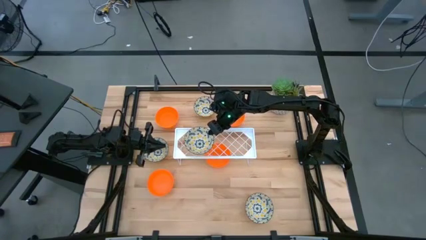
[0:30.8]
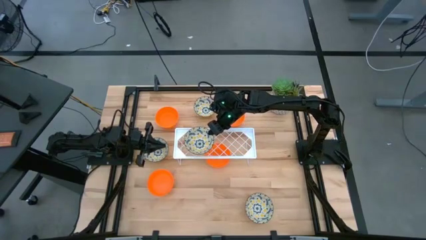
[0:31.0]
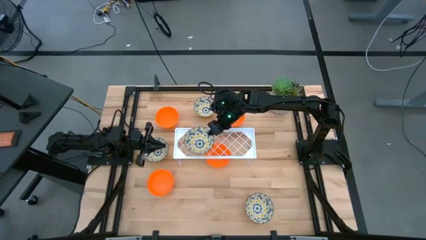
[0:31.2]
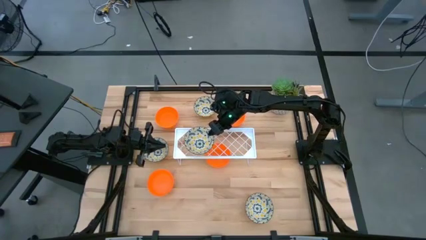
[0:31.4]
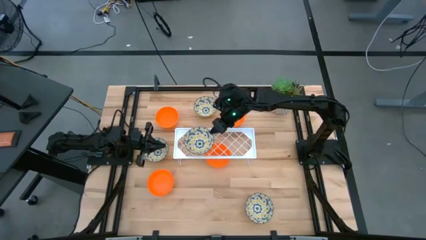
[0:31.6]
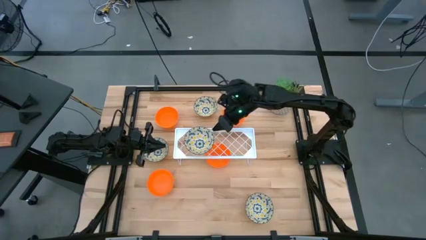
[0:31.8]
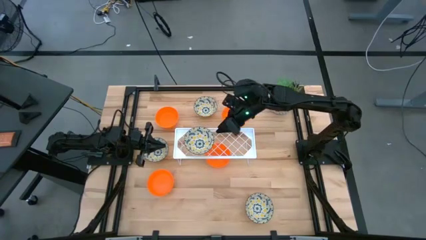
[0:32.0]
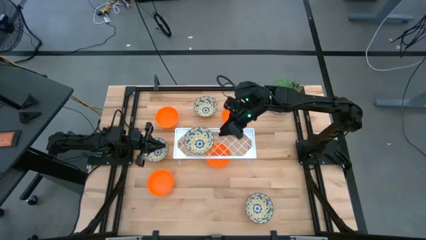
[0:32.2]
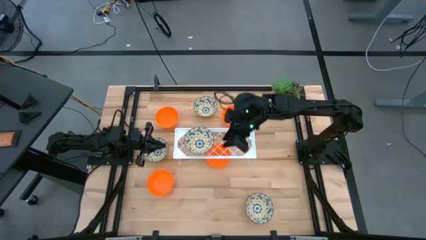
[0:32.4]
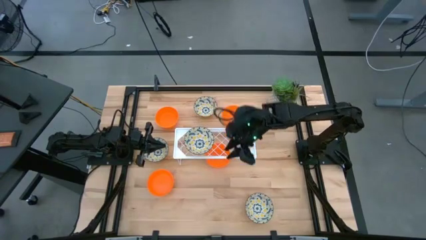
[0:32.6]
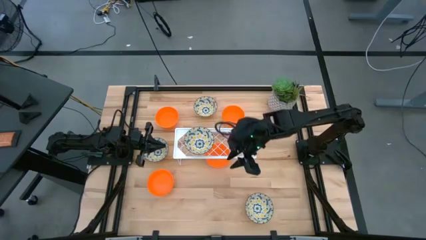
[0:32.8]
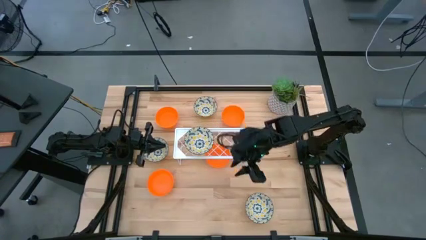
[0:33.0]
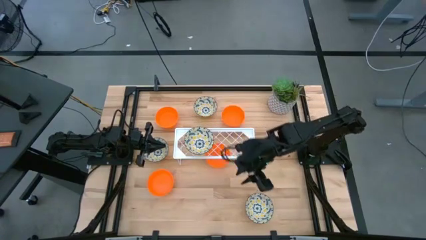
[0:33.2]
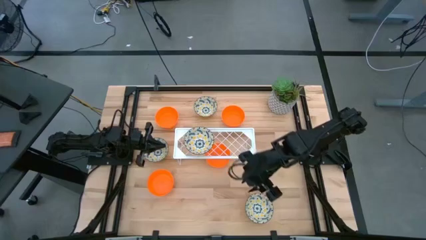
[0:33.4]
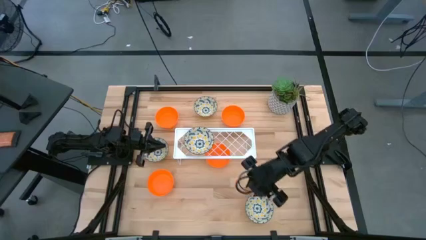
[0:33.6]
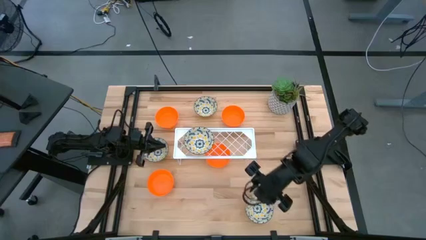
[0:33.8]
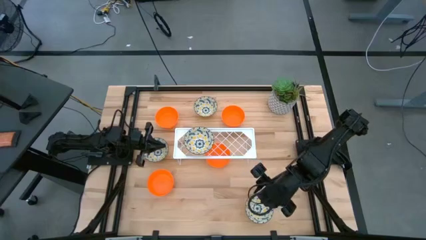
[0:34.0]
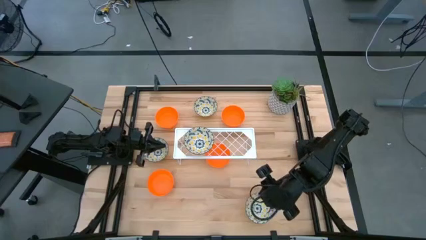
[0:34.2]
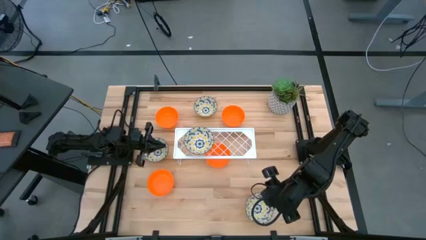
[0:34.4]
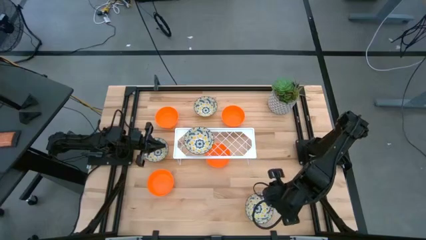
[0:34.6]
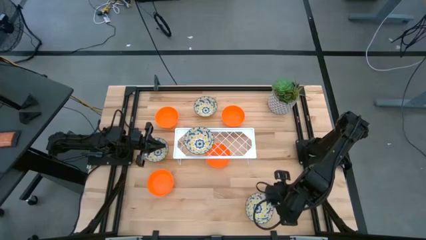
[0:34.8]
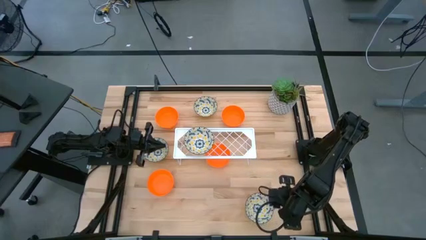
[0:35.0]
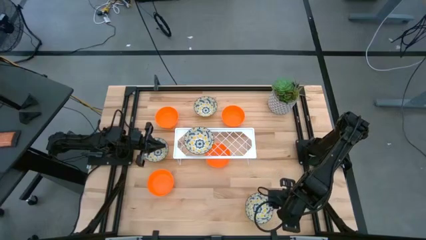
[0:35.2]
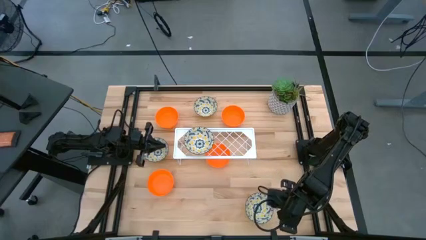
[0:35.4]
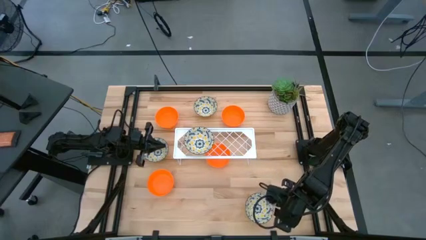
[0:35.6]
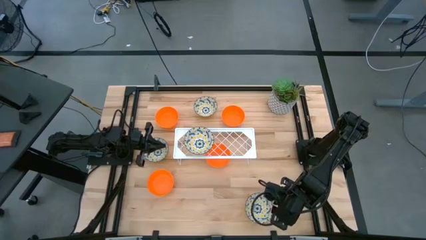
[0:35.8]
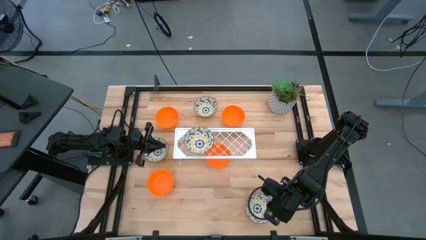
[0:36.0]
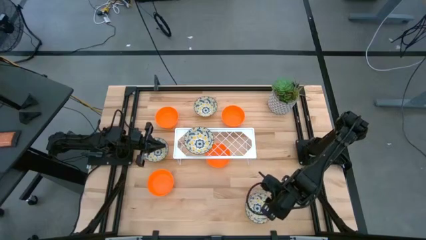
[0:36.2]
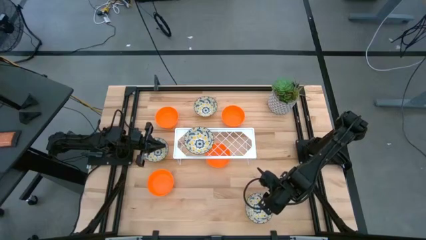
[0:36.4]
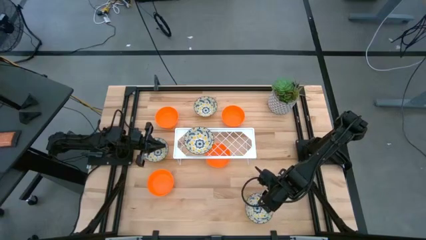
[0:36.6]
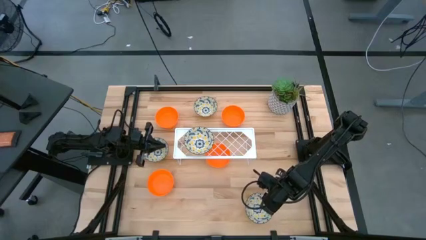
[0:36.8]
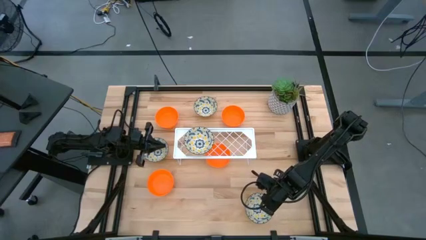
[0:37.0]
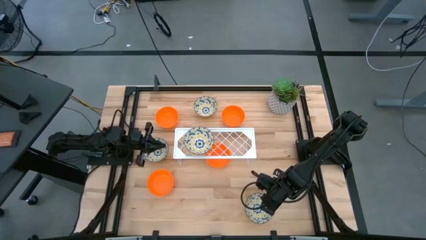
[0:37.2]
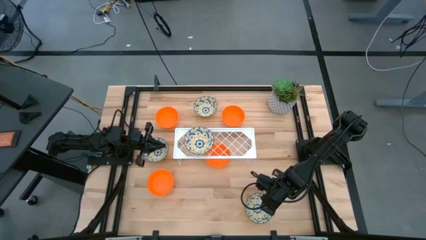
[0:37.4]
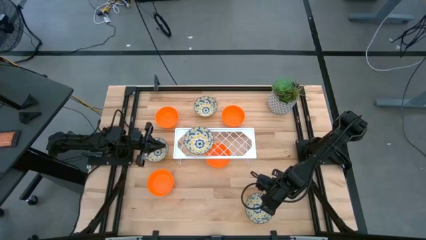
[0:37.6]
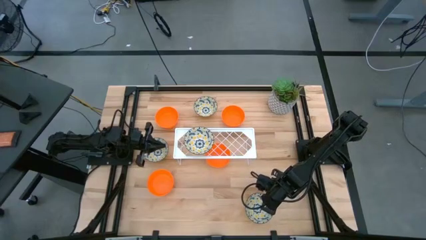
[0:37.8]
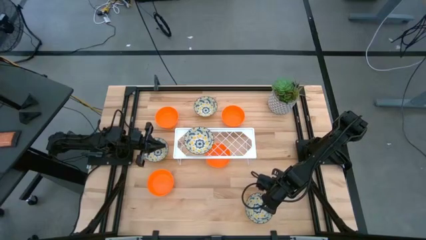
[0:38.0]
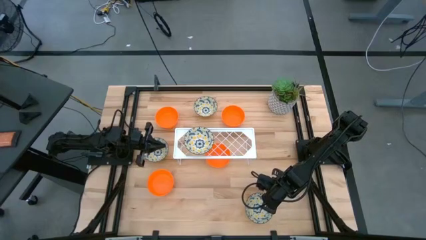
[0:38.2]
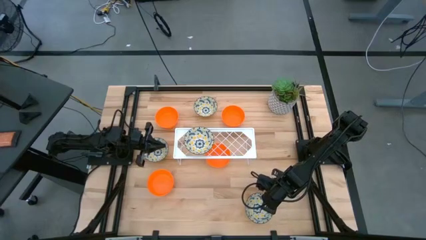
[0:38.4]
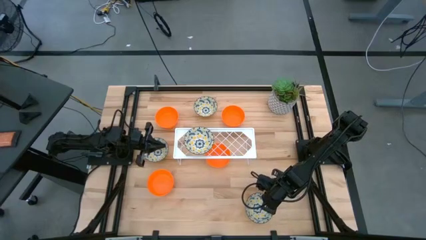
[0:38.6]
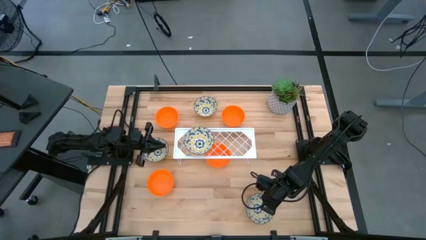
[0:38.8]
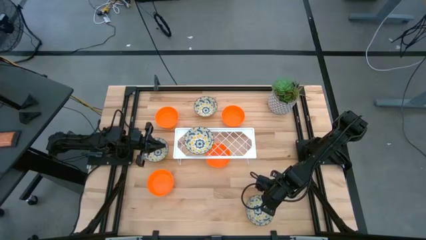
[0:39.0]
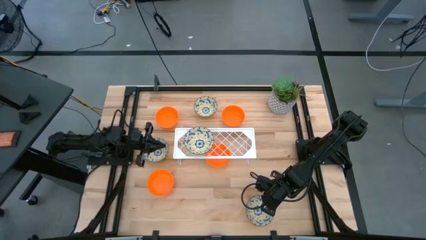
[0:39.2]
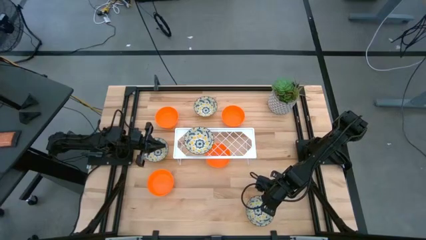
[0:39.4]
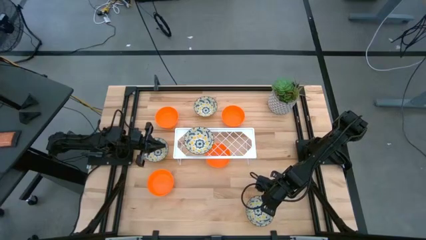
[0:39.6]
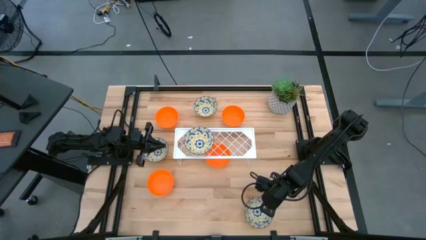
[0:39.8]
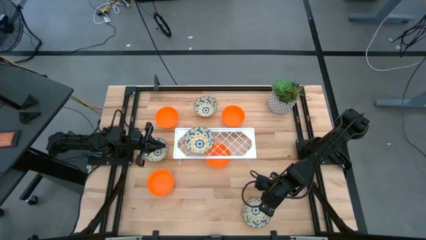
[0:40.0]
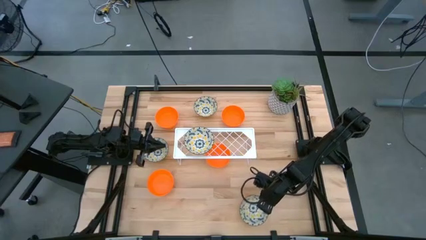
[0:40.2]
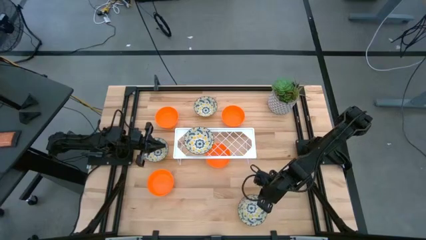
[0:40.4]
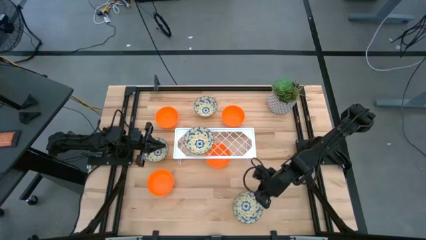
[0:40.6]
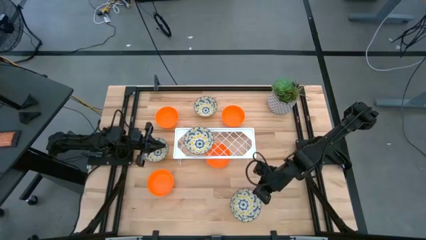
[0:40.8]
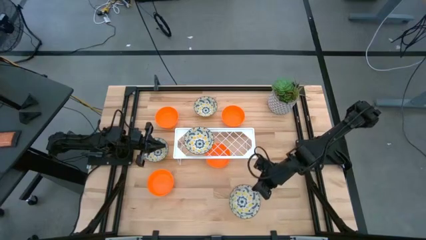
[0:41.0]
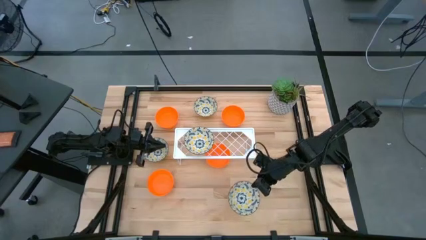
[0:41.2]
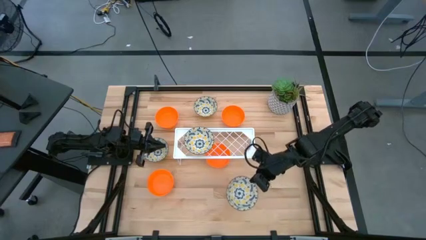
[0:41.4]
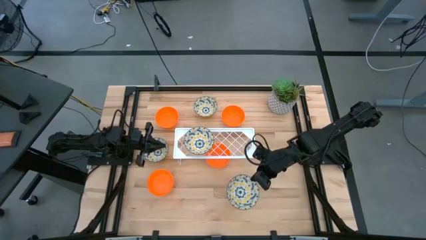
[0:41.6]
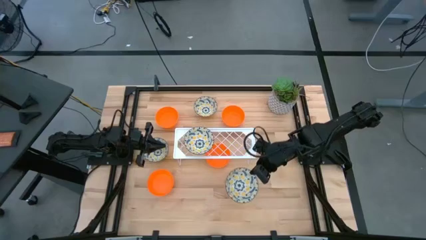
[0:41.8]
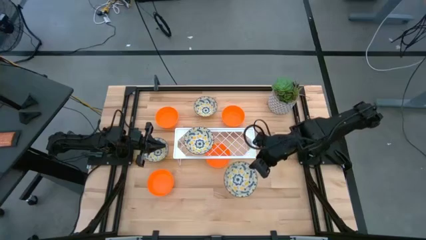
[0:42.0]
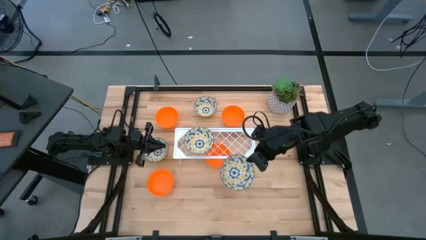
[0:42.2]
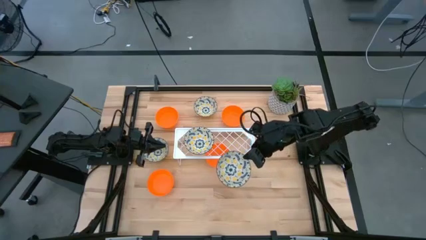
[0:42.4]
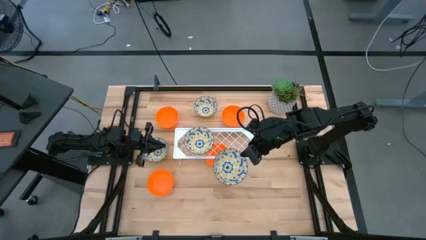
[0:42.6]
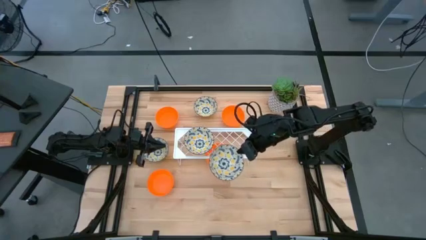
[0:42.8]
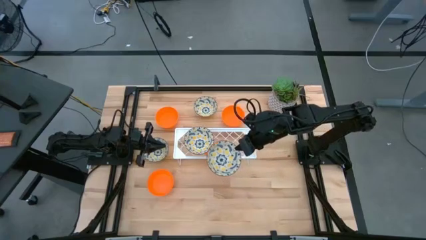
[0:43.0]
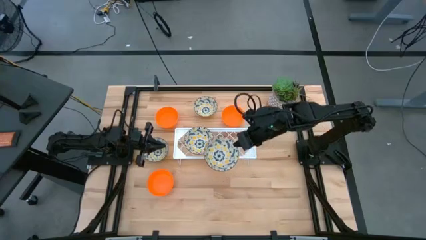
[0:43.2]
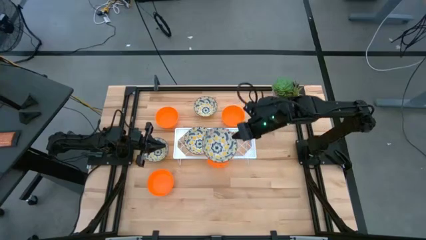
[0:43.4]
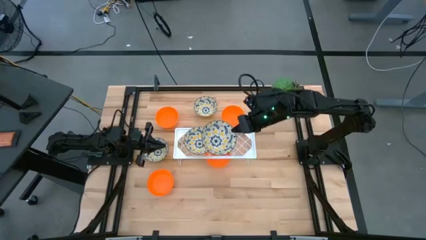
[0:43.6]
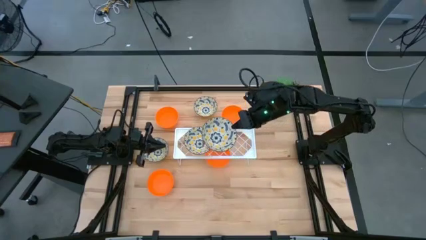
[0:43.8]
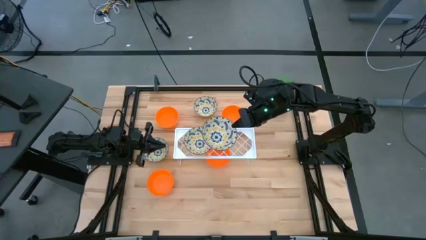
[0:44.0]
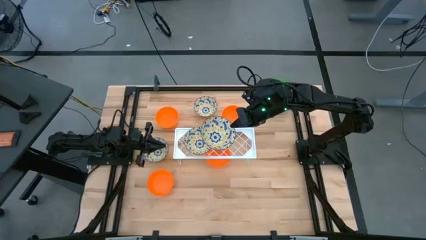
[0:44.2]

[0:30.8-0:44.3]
Task: Pick & Place Mini bowls
Stack the white patterned bowl on the white patterned bowl on the shelf
